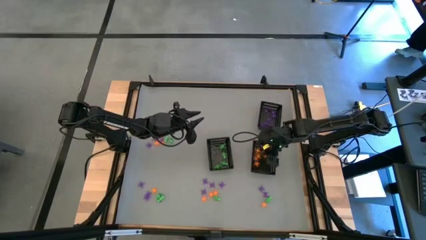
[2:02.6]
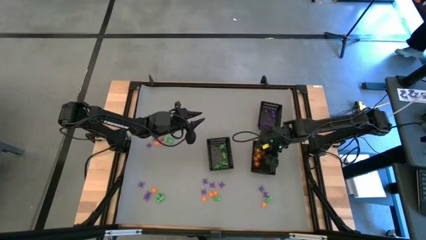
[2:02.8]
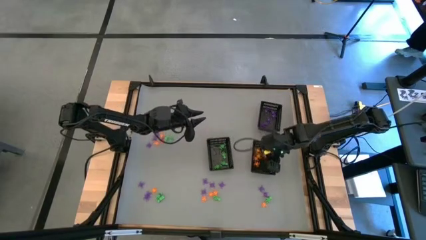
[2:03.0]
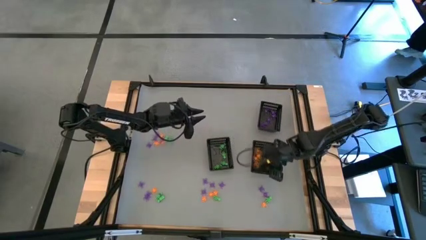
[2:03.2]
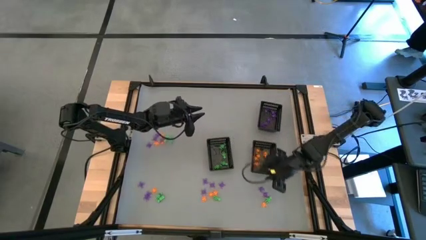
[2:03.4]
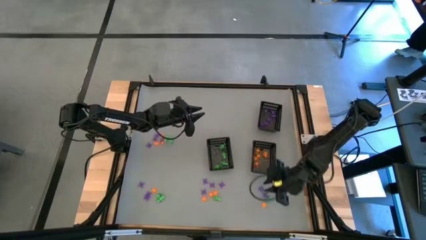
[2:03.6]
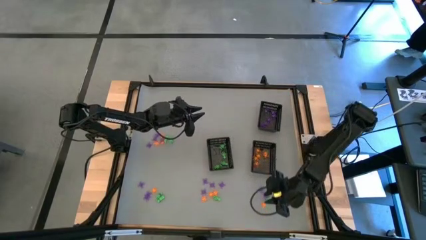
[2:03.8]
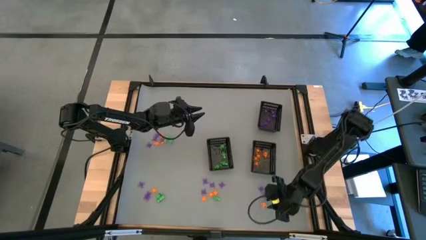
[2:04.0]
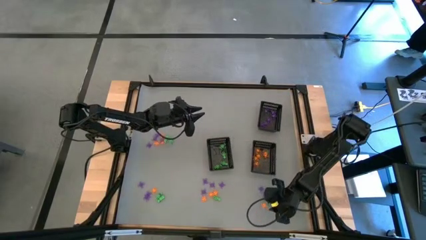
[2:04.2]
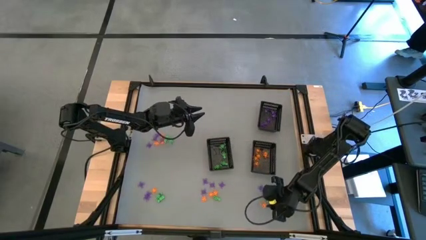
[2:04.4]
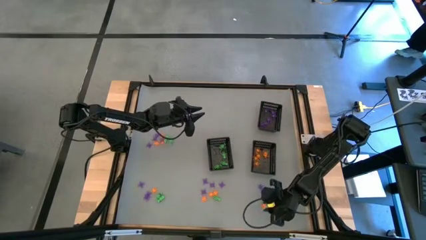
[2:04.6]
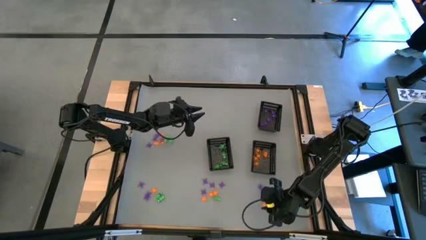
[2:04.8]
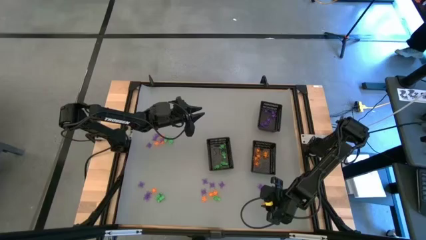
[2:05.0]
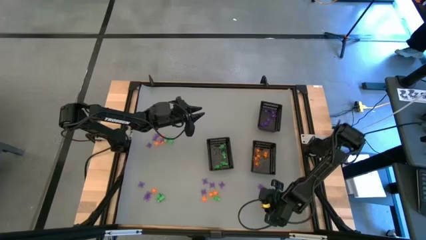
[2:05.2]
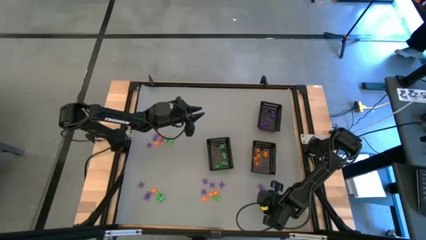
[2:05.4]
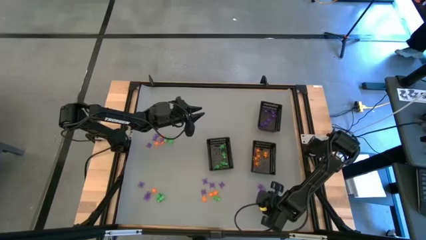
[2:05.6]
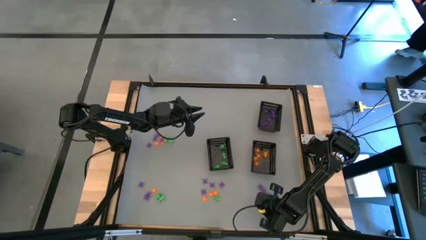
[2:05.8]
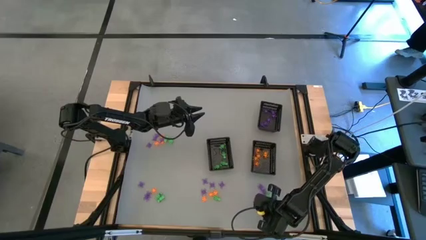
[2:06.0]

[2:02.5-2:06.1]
Task: Sort Halloween decoration
Put the orange spider toy into the bottom right bin

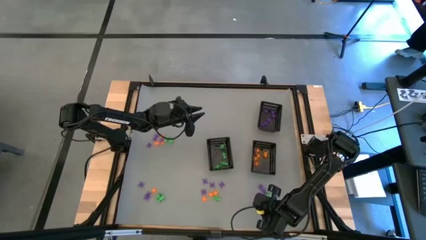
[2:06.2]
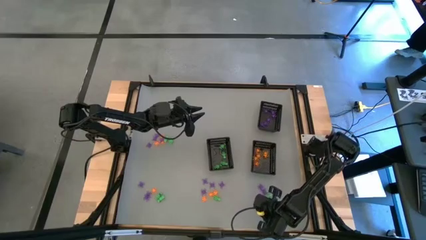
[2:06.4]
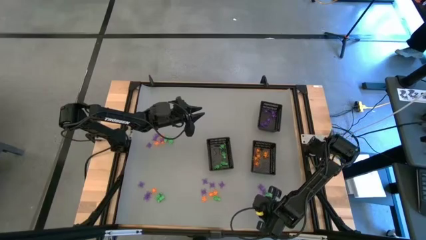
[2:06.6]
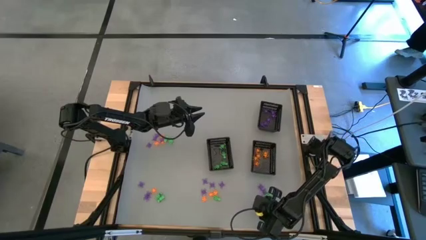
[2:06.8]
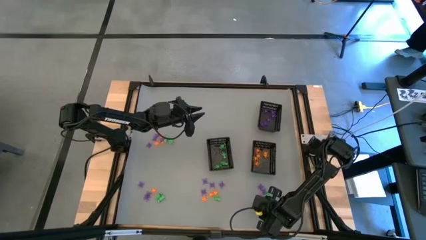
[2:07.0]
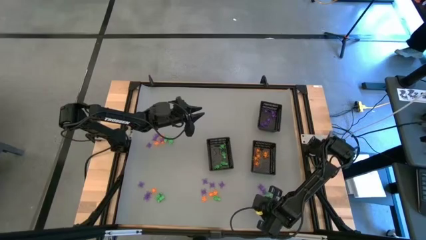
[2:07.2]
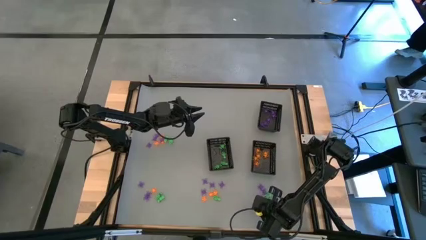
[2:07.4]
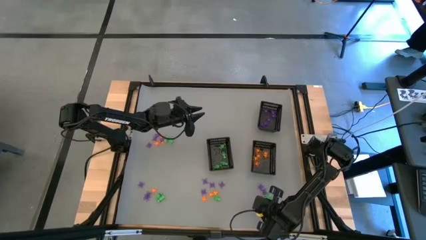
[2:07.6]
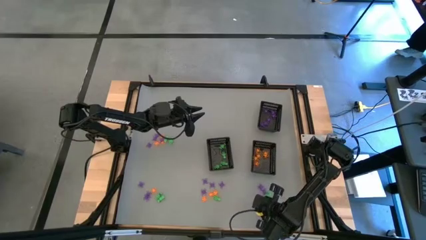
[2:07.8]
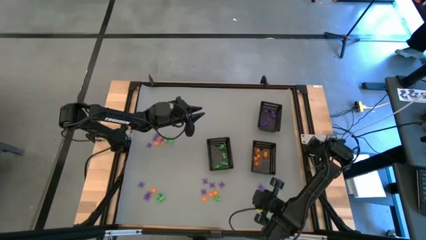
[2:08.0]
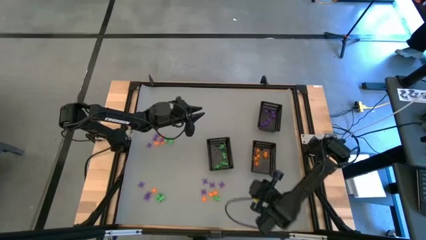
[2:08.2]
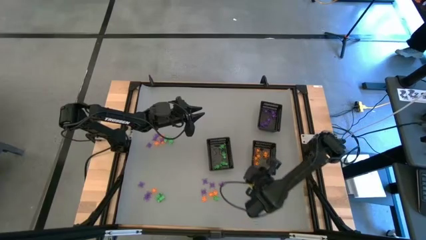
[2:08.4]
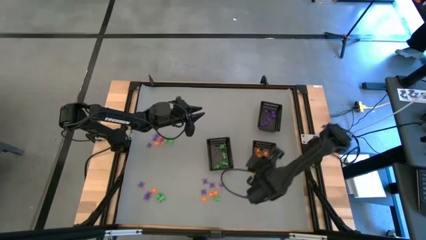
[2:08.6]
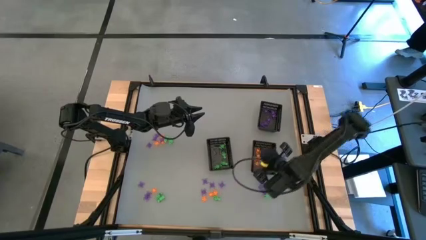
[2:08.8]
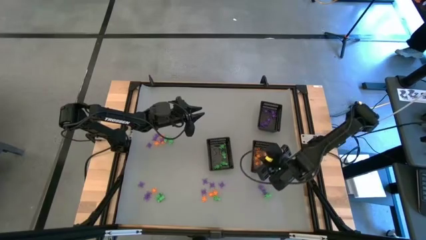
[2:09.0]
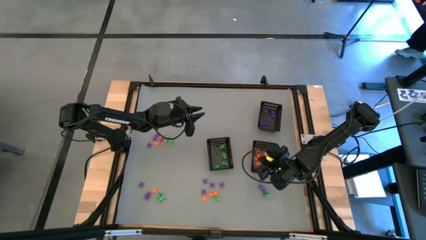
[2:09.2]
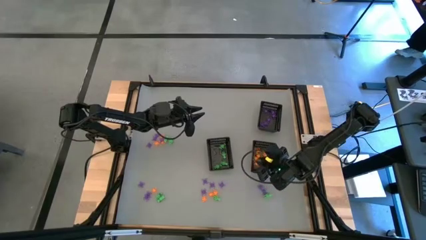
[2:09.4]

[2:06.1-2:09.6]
Put the orange spider toy into the bottom right bin

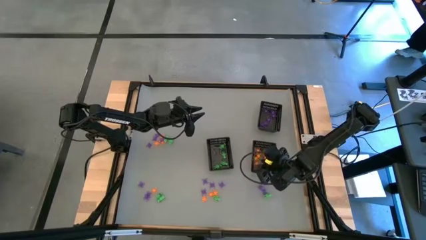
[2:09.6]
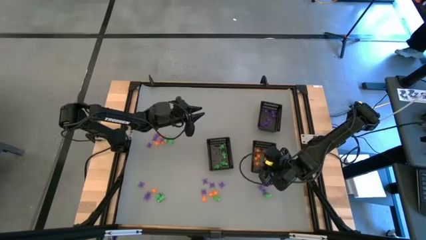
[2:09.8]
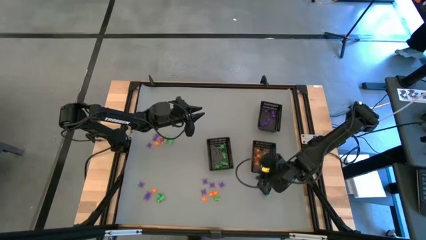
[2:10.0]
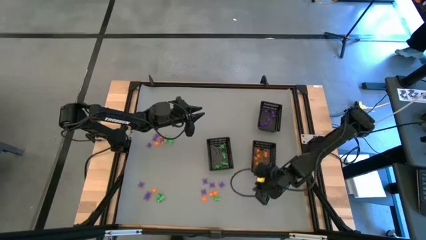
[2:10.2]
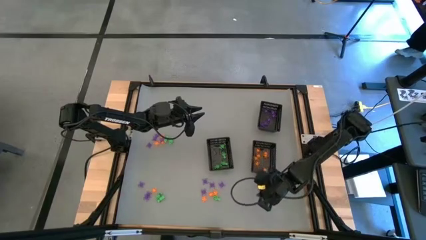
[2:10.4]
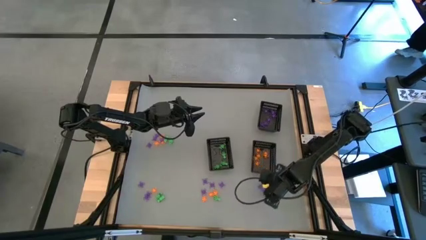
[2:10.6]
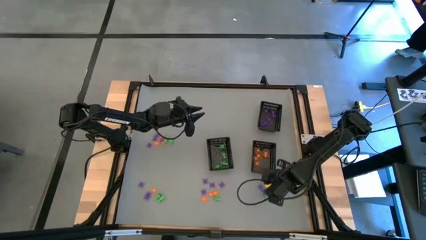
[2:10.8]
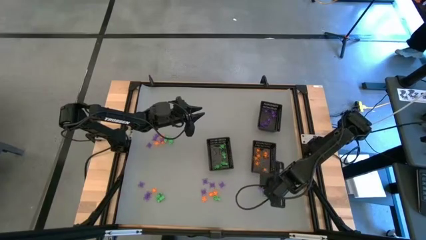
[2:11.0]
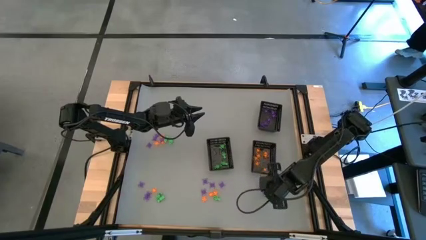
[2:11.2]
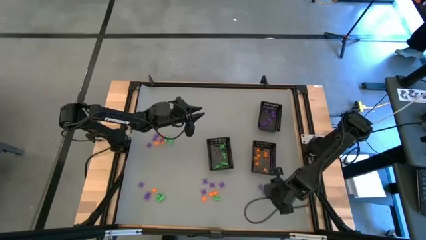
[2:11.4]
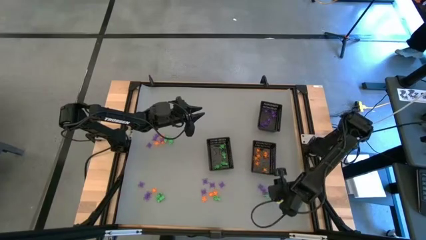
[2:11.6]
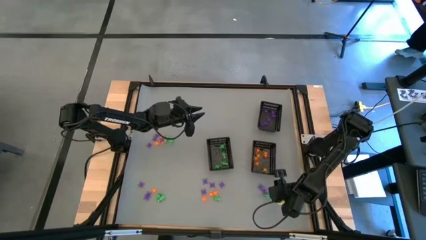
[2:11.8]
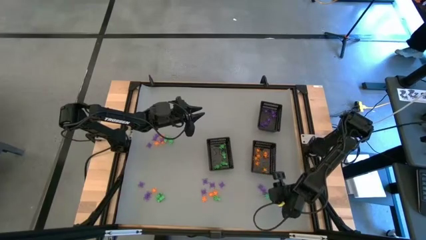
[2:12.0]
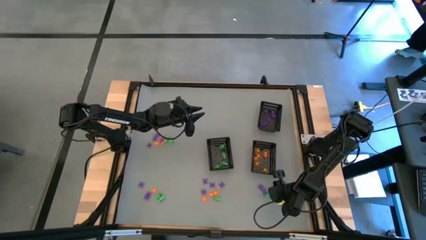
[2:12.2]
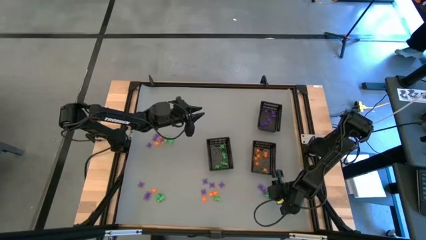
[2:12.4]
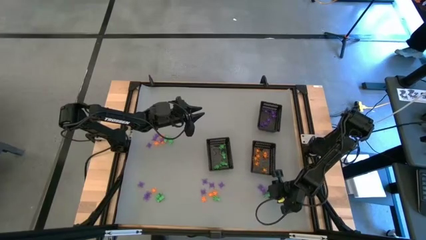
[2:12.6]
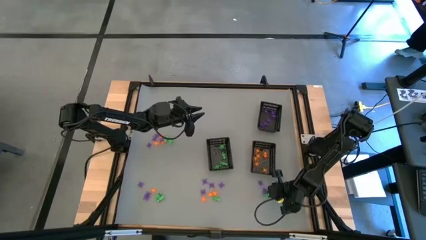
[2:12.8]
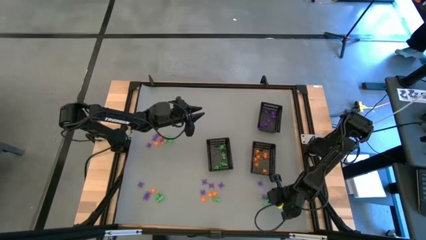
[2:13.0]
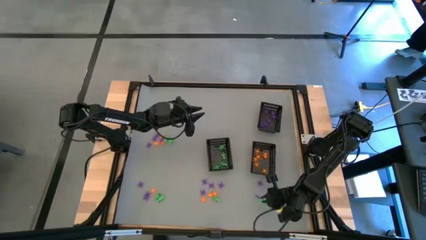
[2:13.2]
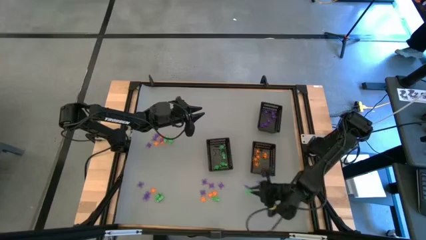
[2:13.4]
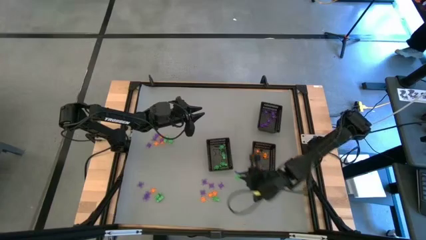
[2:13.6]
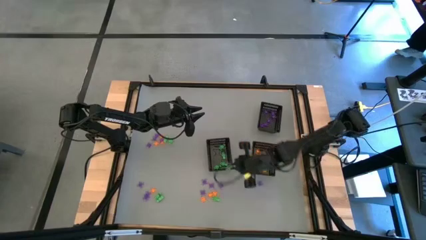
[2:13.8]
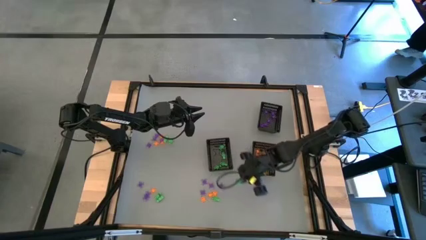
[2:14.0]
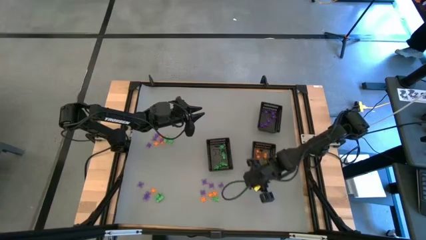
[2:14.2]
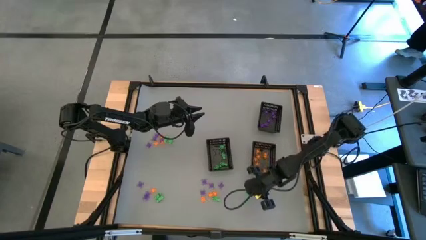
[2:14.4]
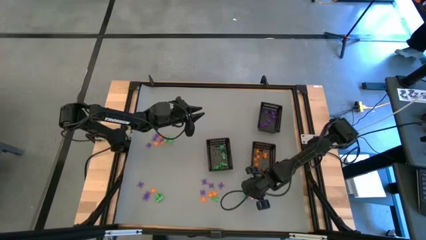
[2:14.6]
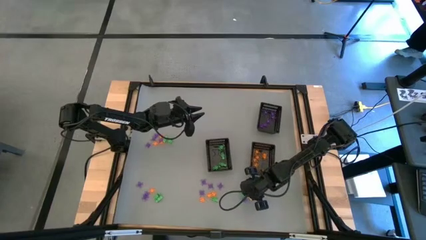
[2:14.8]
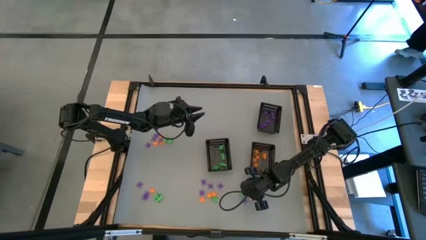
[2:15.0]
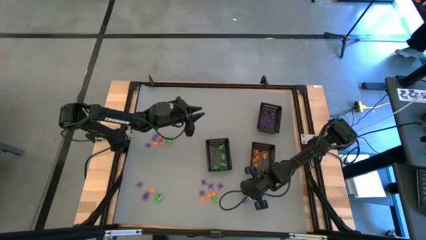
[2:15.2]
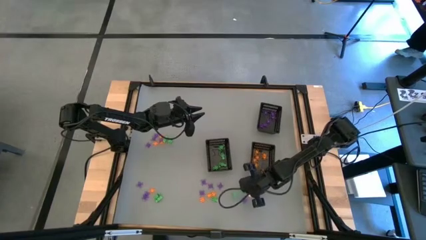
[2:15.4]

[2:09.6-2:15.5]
Put the green skeleton toy into the bottom left bin

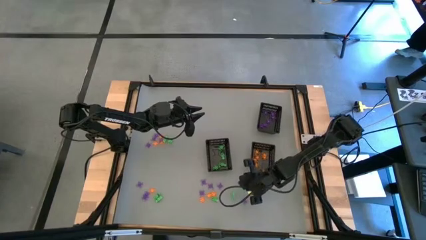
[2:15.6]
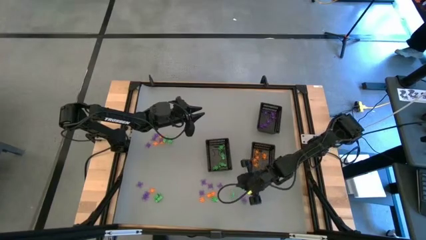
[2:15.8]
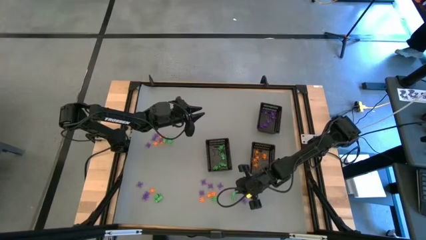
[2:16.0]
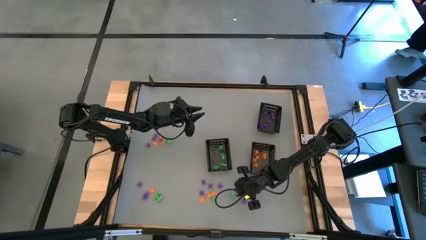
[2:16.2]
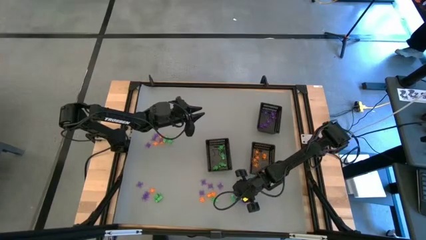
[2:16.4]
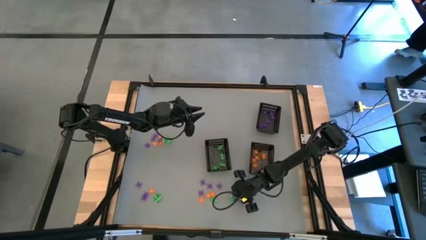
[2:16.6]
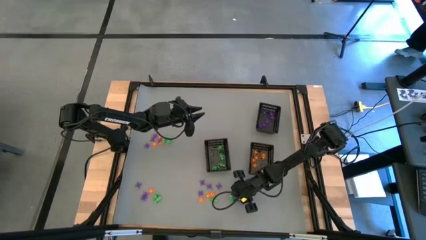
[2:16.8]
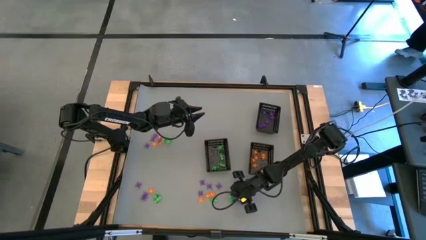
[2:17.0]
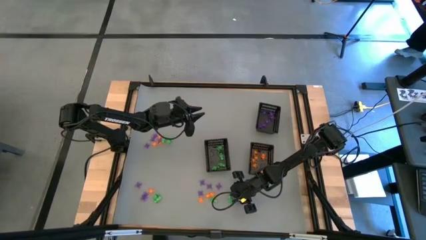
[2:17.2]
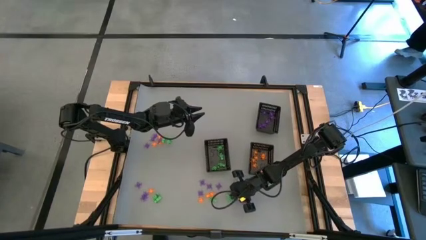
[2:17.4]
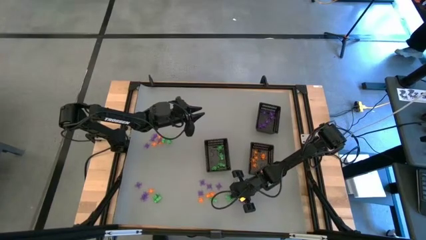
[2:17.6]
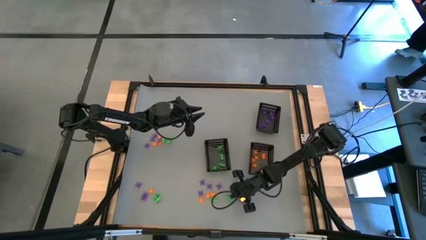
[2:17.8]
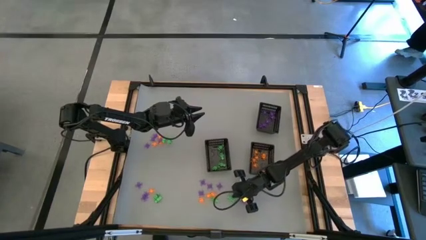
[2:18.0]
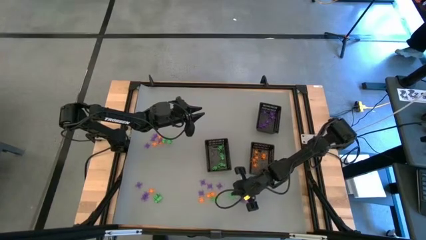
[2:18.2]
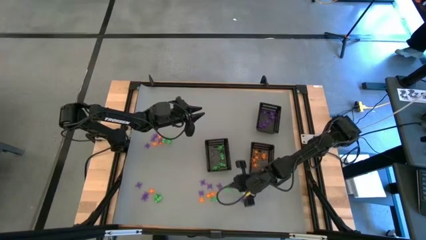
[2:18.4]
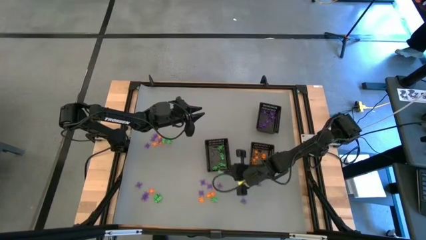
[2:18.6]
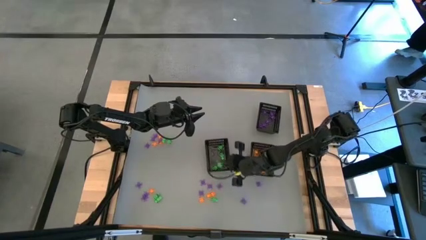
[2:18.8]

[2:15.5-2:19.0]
Put the green skeleton toy into the bottom left bin

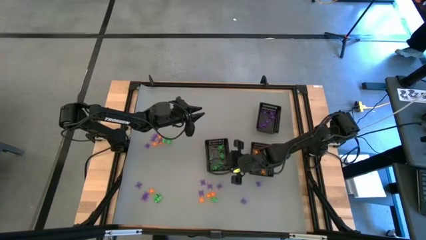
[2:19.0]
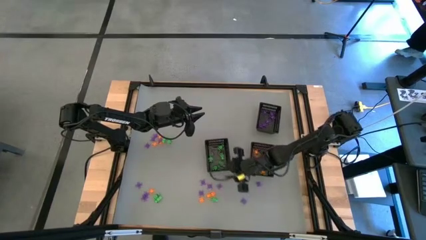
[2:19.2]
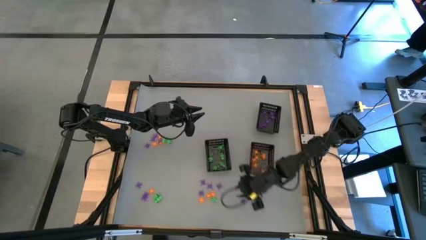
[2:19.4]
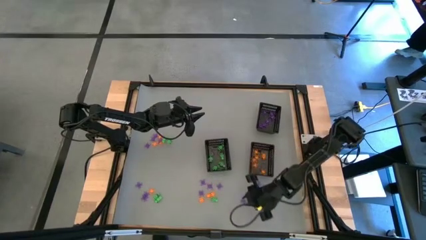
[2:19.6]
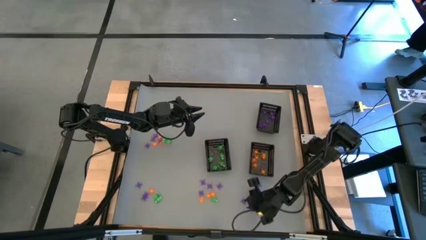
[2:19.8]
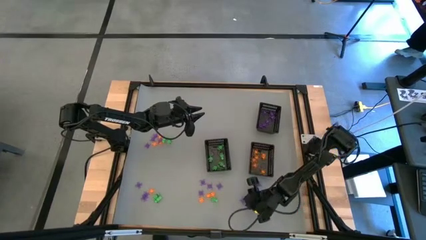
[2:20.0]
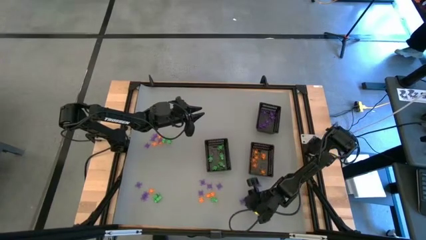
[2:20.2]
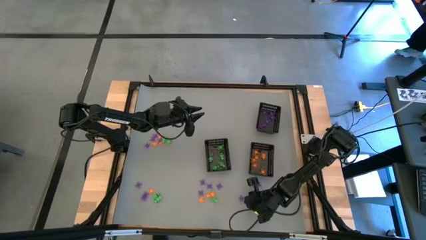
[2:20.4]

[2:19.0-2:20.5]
Put the purple spider toy into the top bin
